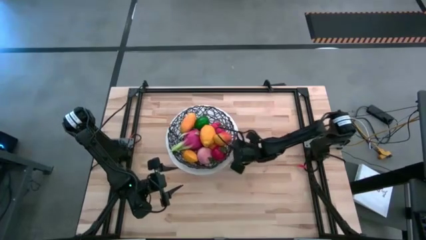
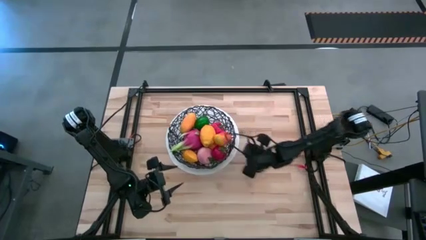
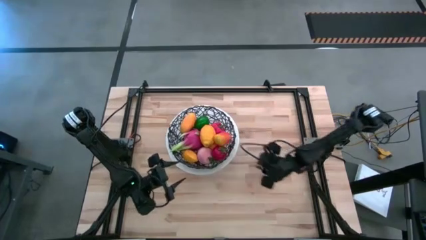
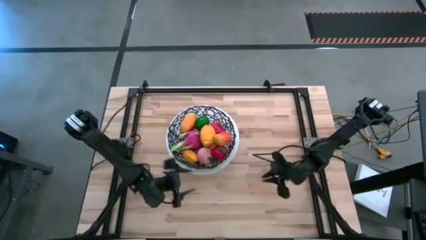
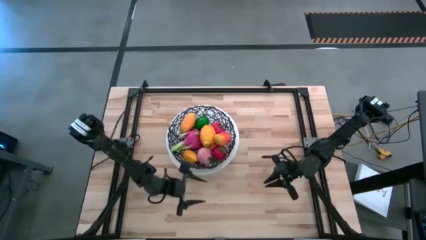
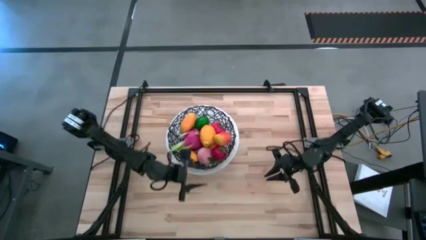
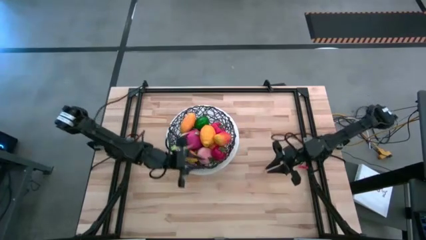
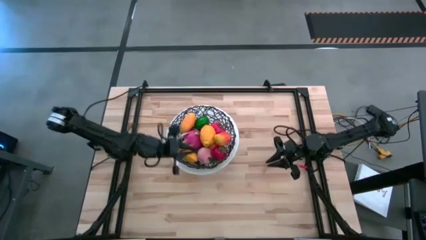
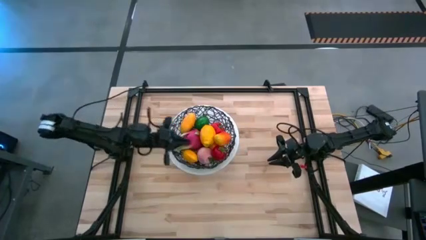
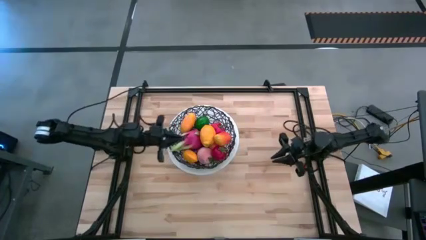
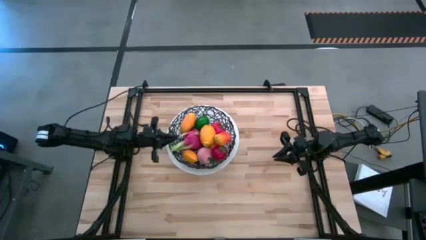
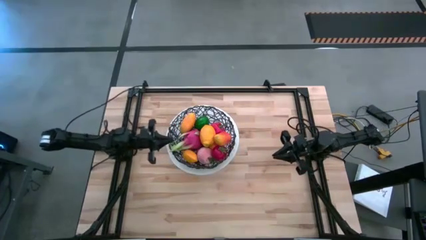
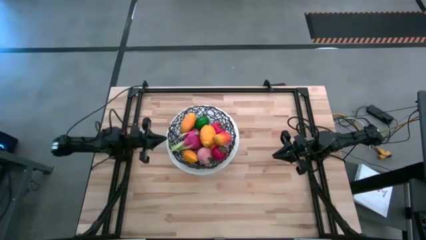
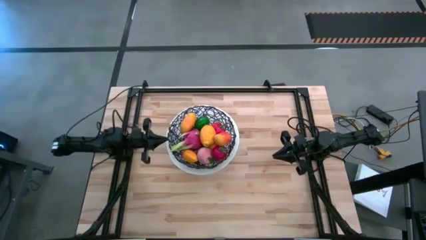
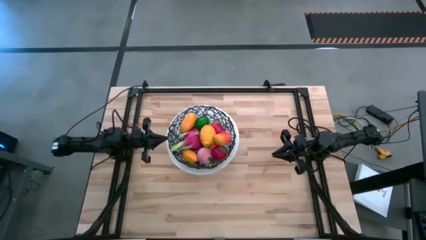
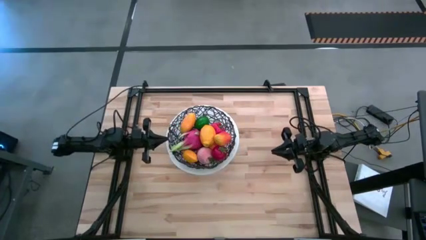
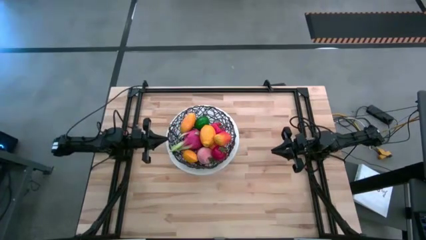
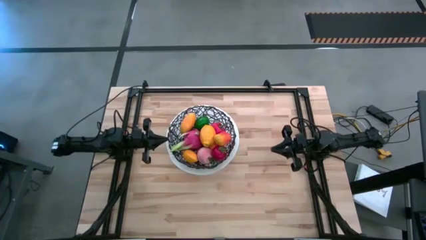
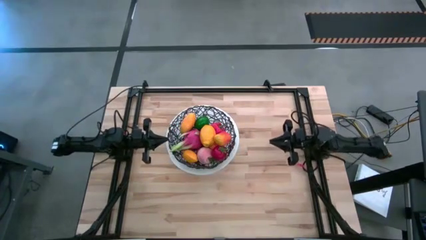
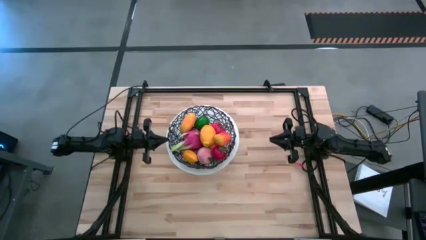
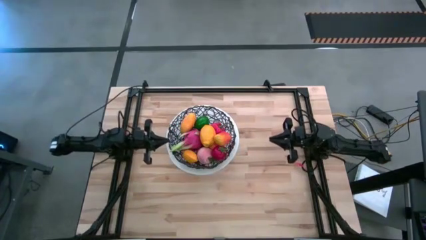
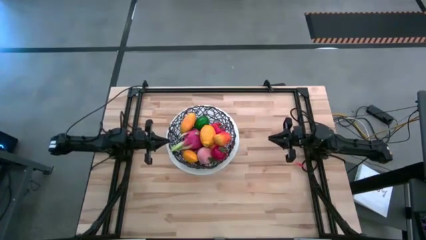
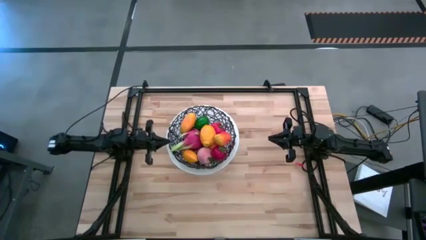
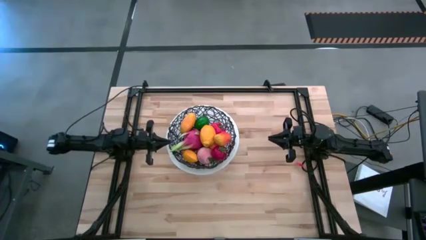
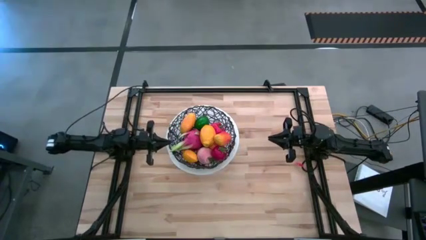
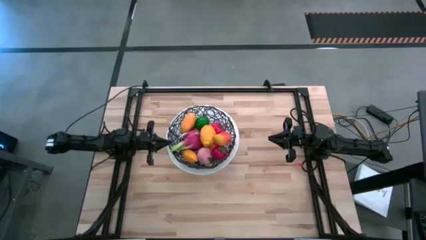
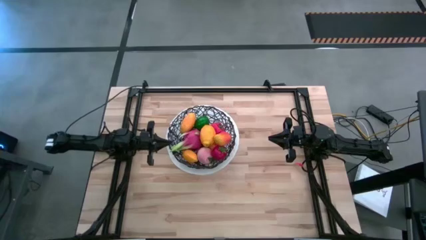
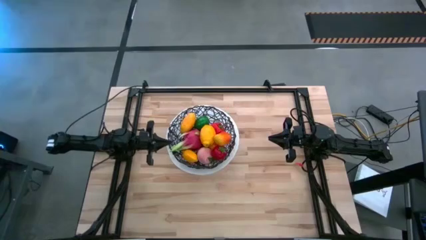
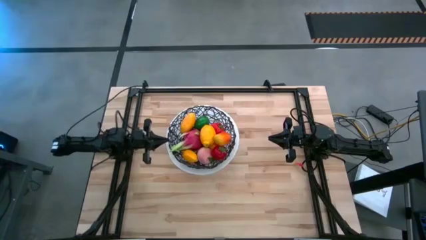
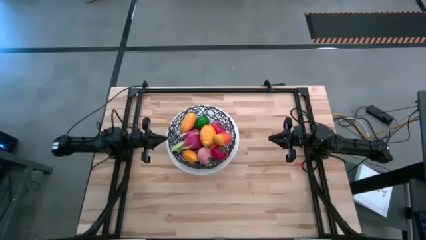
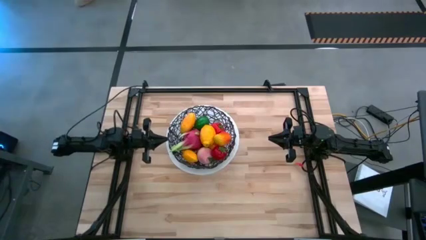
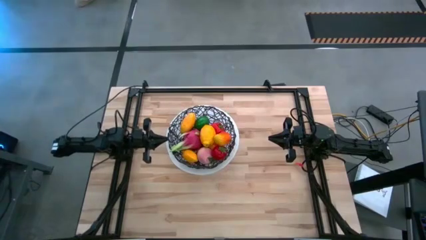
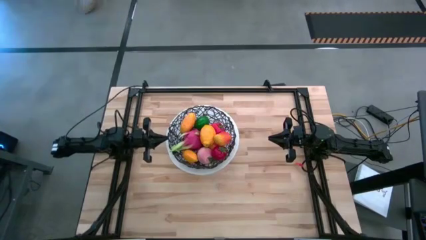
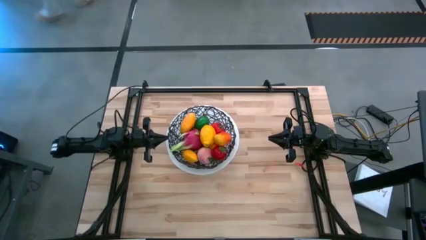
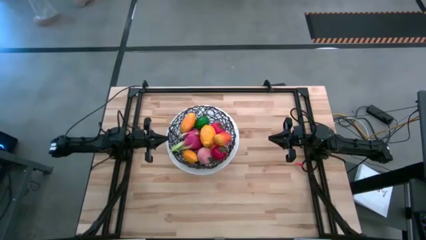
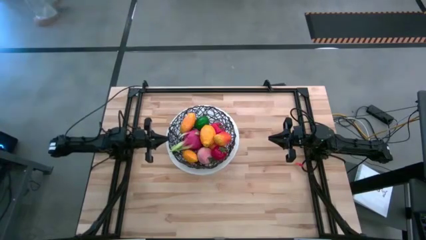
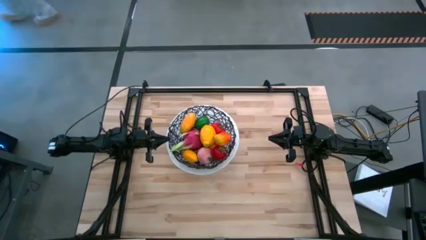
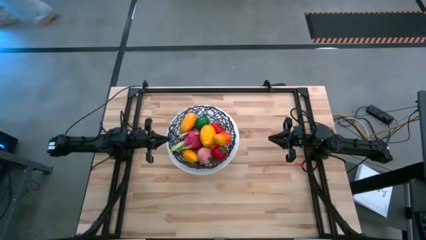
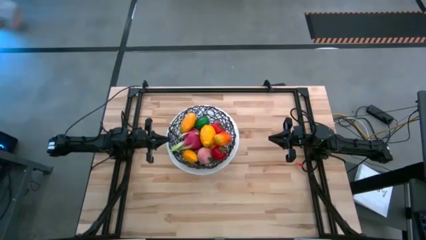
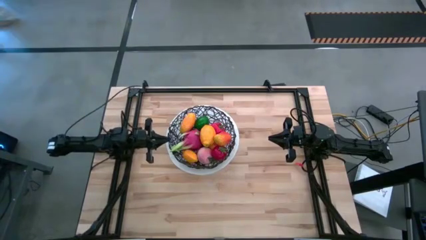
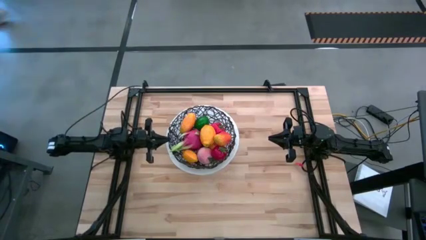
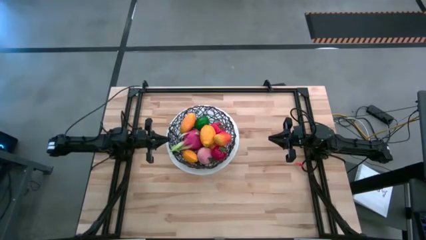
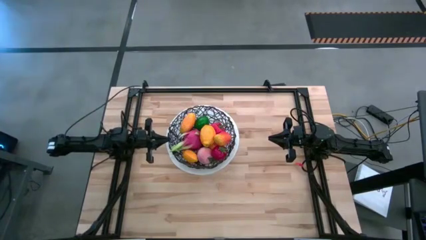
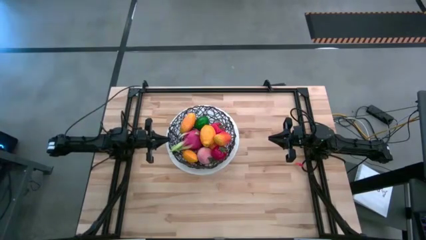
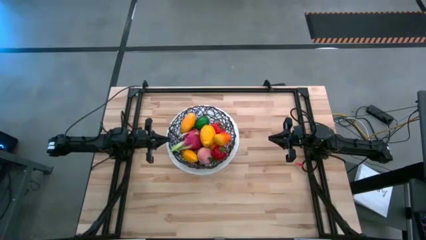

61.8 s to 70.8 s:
Task: Build produce basket
Return to Home Position

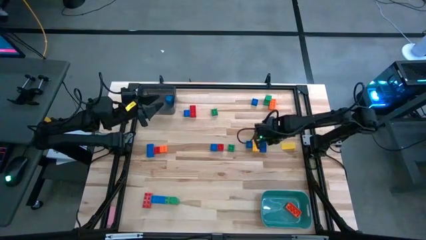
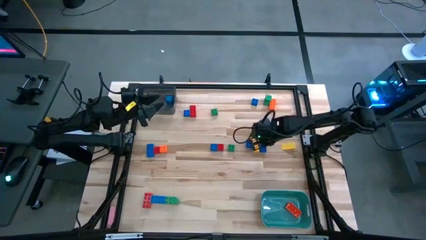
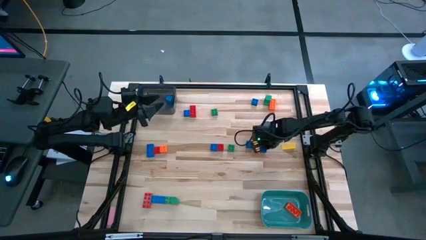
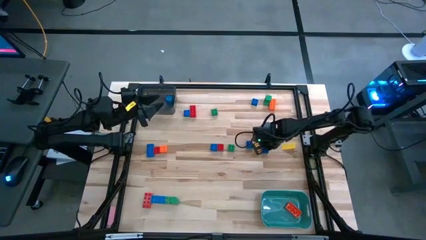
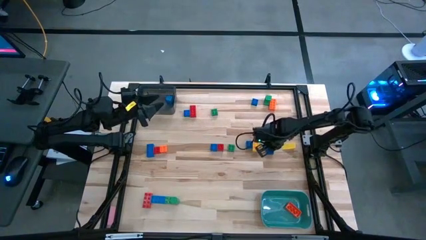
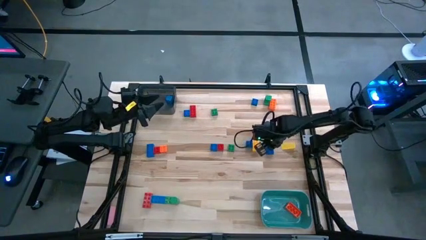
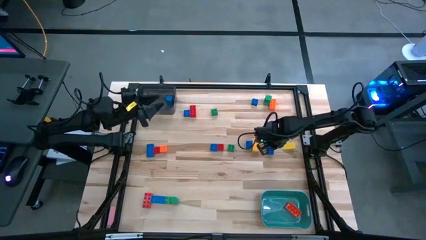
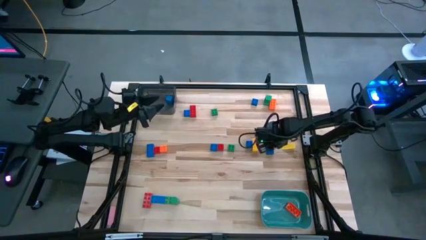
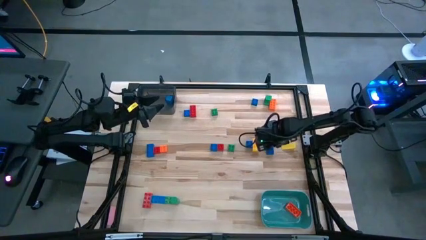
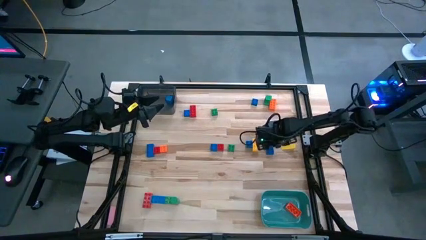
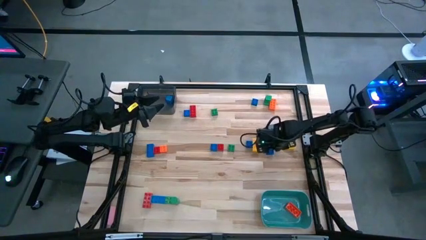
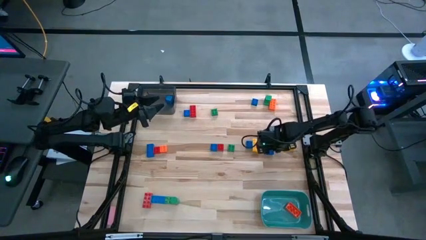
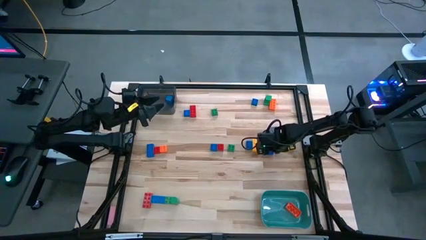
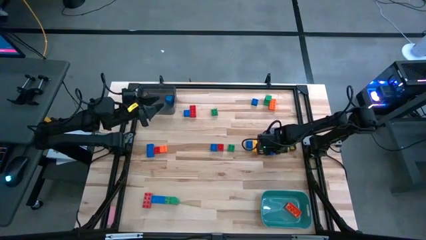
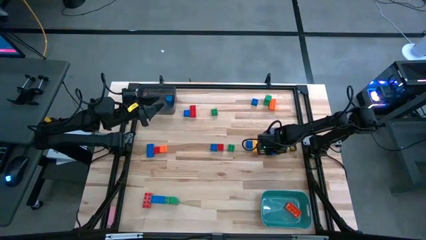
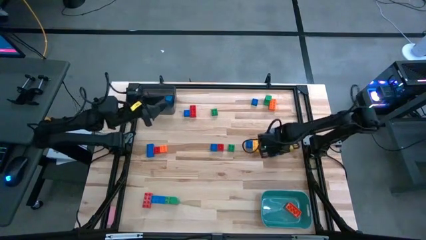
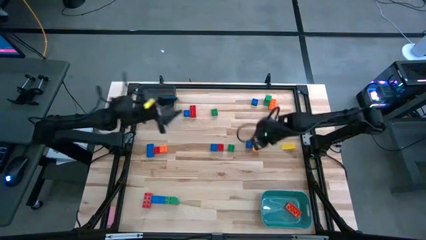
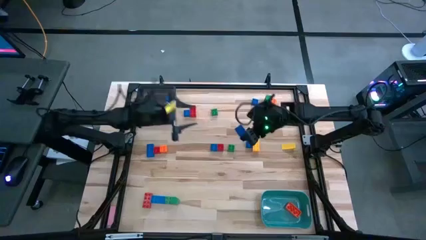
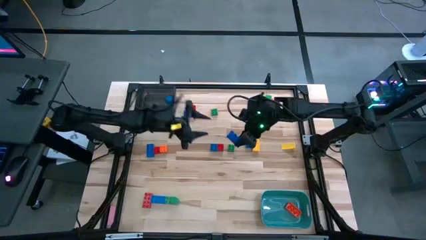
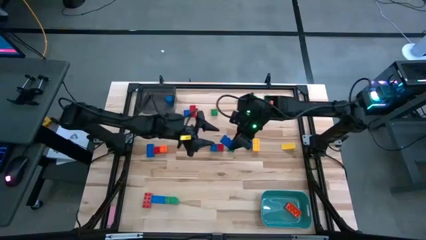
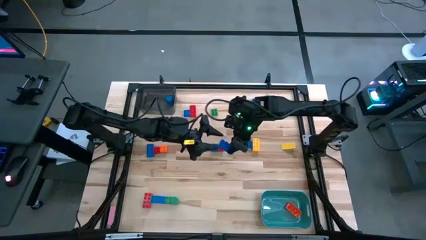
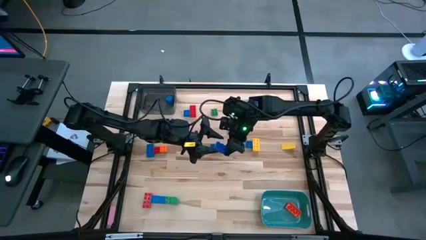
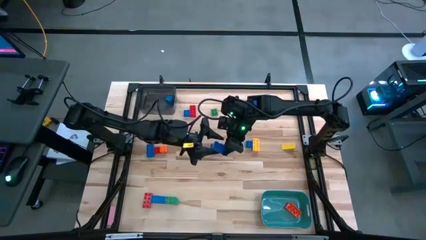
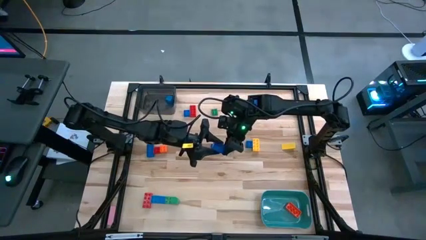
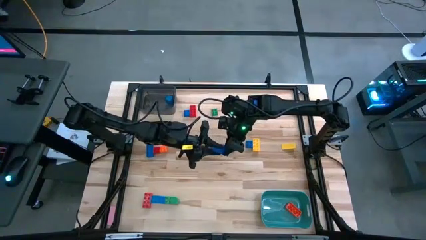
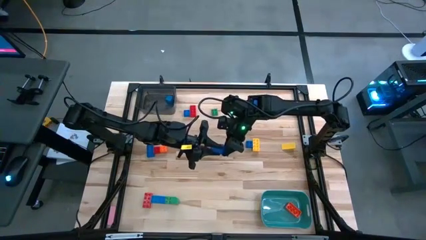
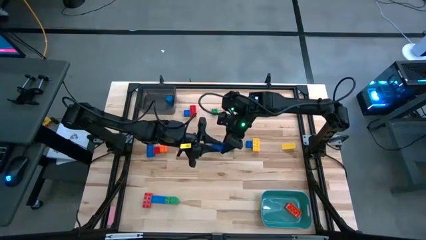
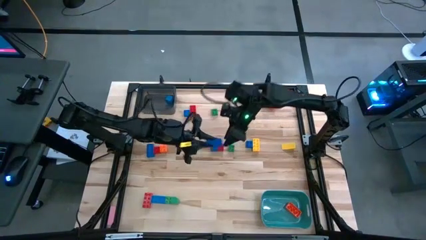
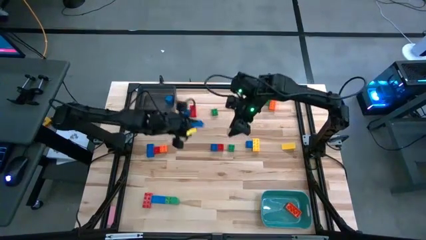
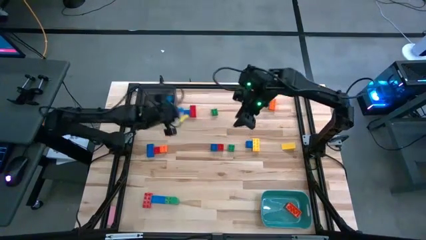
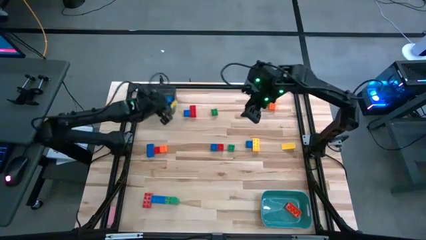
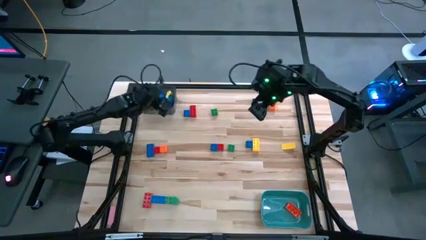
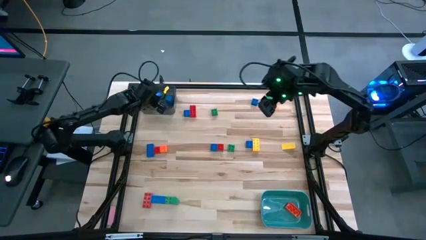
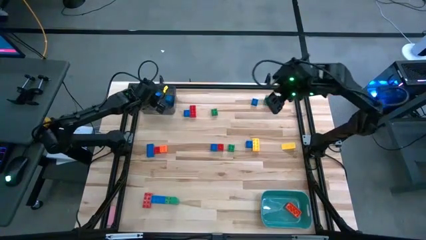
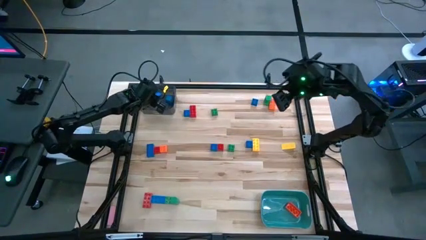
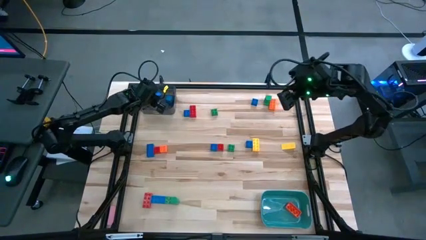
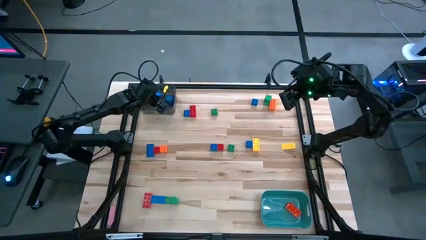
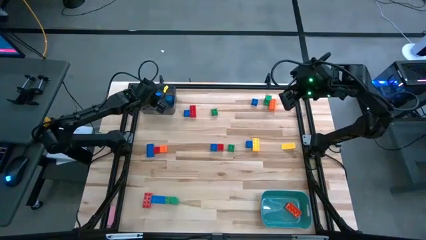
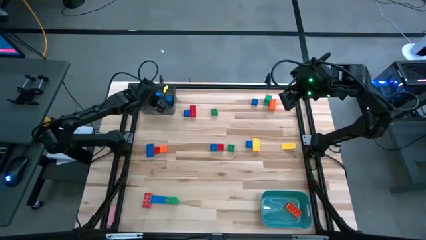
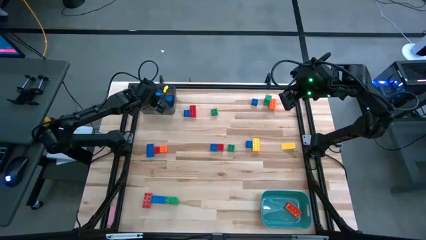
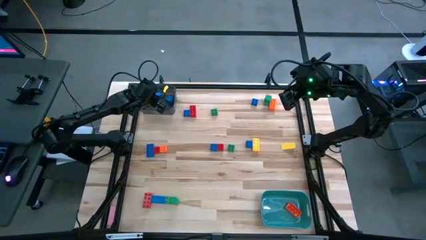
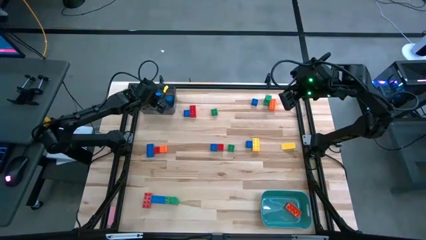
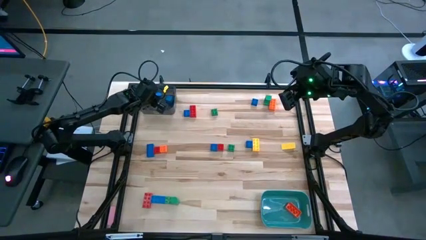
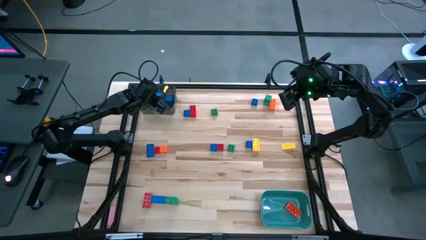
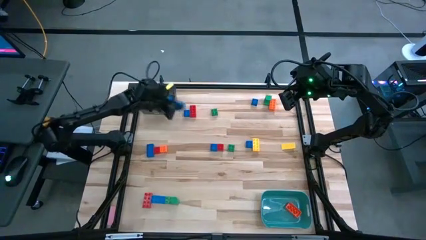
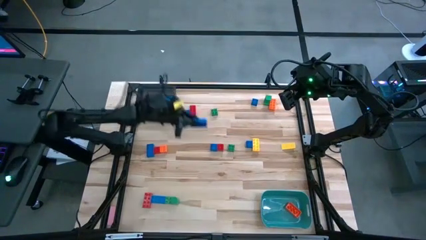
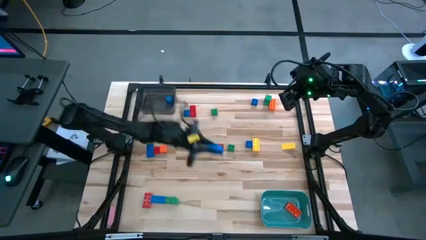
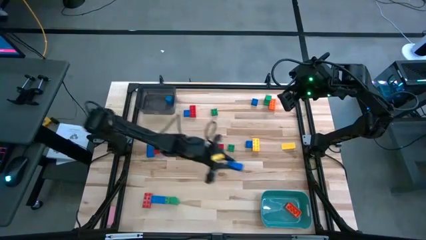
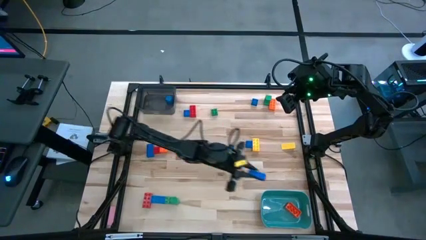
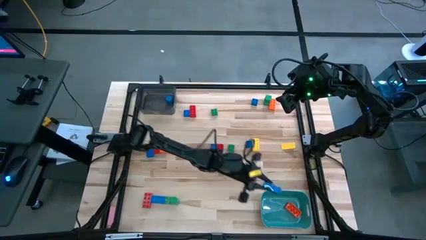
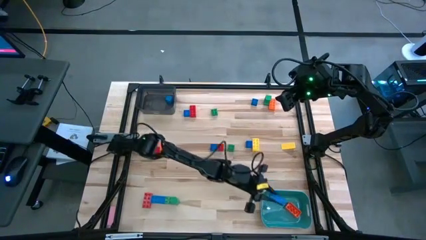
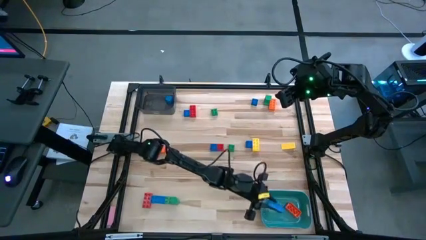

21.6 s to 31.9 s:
Task: Sort blocks by size
Put the right blue game piece into the blue bin
